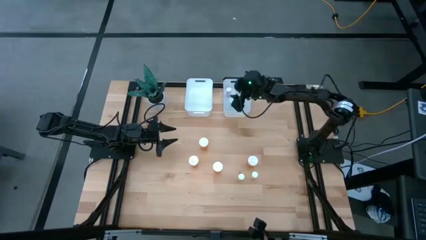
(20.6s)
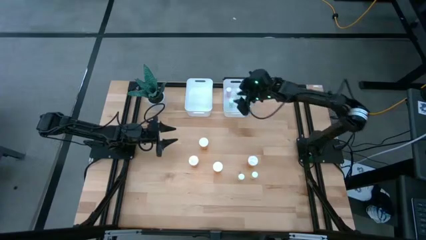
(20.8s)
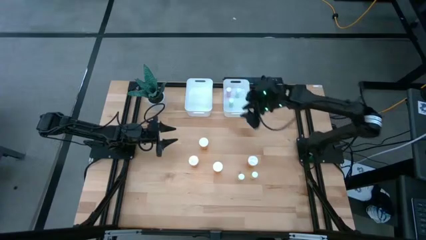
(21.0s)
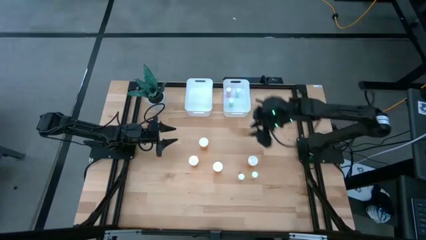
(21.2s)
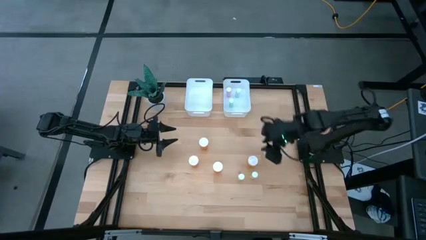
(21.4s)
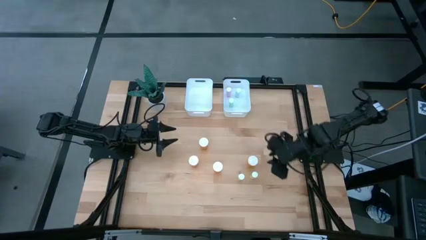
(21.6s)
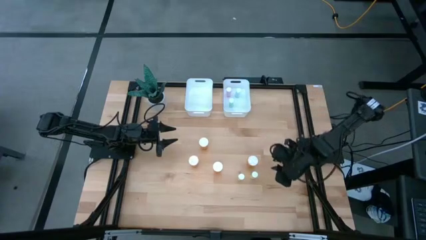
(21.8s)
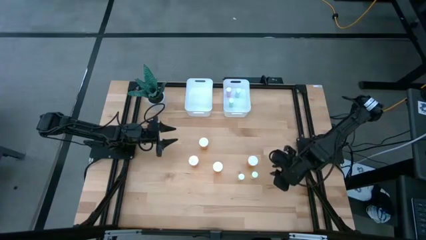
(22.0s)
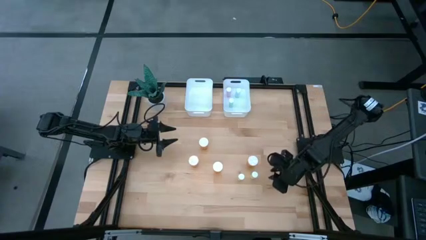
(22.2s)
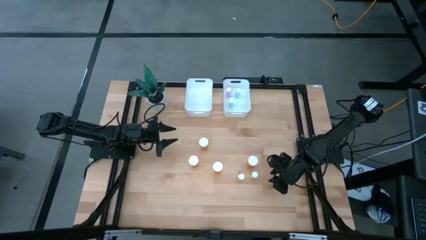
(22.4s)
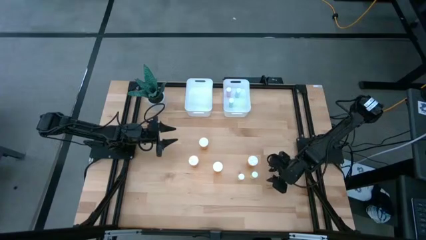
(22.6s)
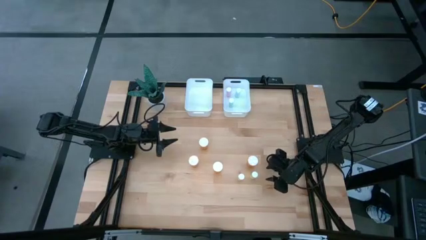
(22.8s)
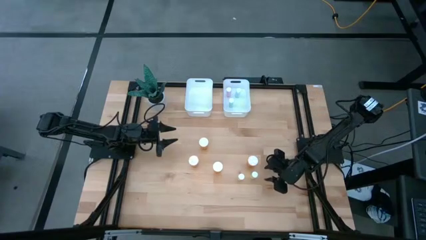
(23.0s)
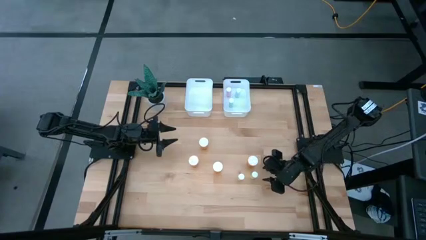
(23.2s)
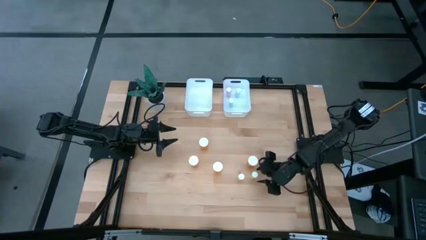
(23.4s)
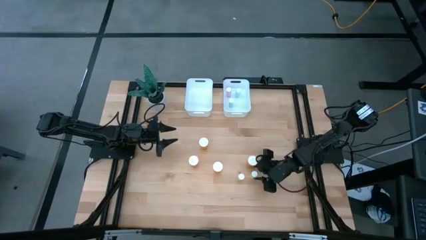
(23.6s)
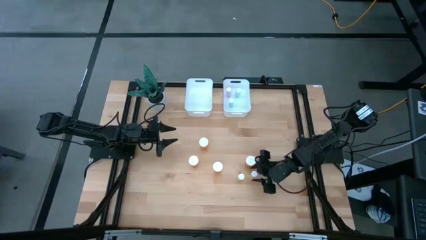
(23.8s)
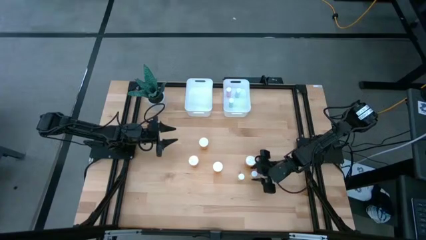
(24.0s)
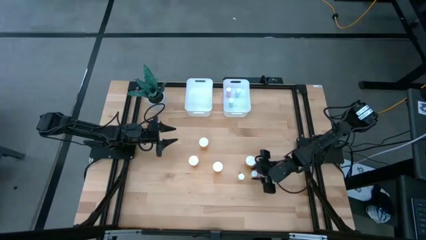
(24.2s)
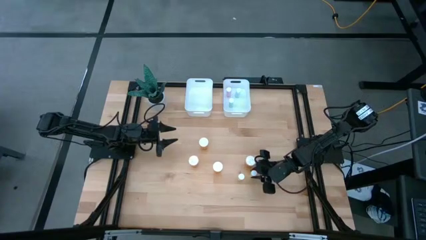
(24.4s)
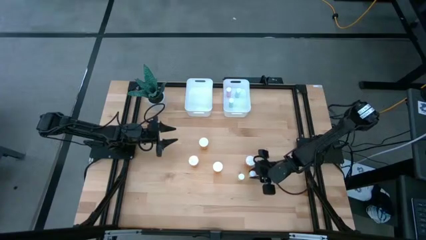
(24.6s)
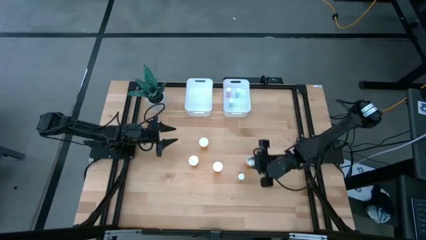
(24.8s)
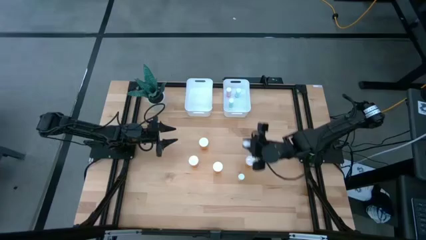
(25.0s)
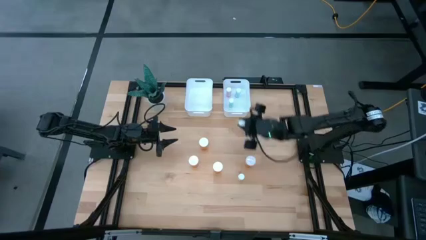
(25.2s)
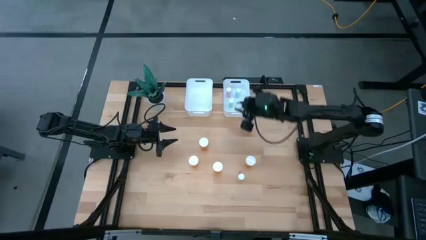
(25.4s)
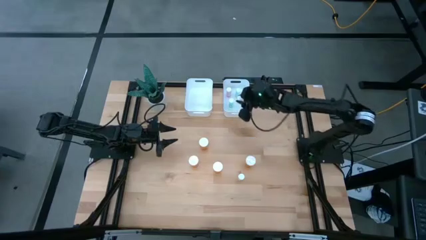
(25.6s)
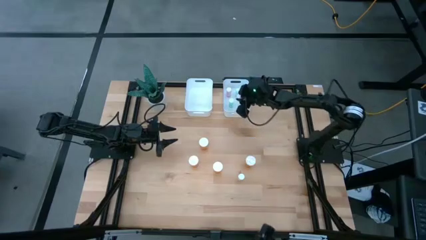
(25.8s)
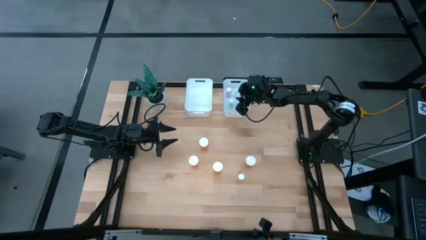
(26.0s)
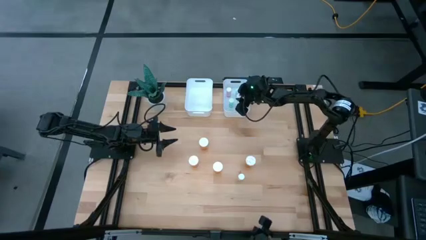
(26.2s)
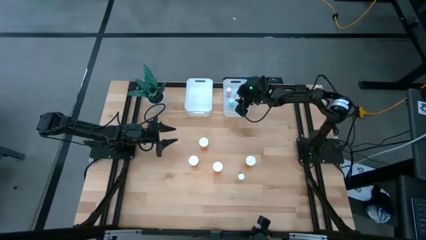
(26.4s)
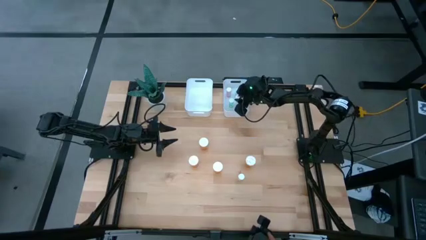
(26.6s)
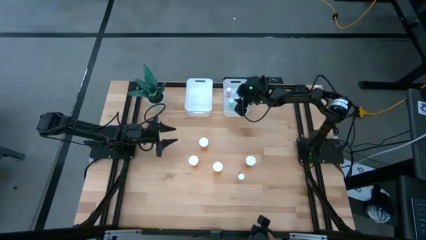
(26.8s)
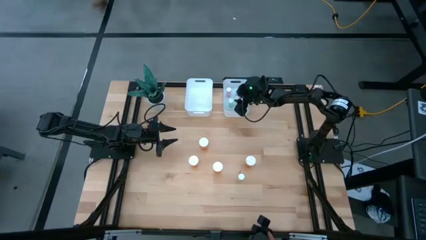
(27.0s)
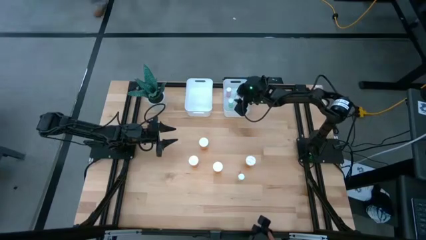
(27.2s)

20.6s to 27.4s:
Task: Pick and place medicine bottles into bin by pill shape (circle, oval)
Put the small yellow pill bottle into the right white bin

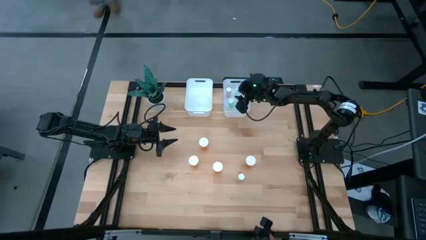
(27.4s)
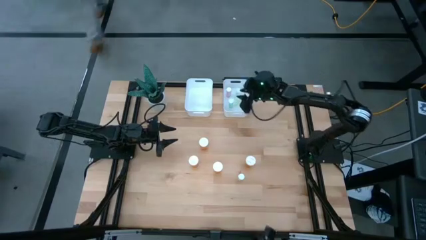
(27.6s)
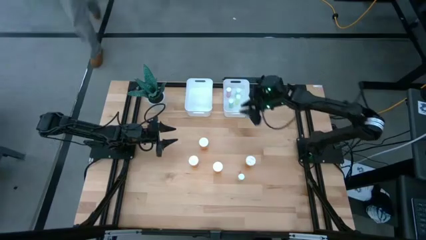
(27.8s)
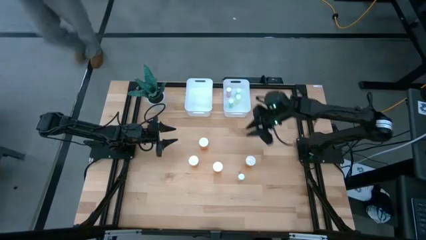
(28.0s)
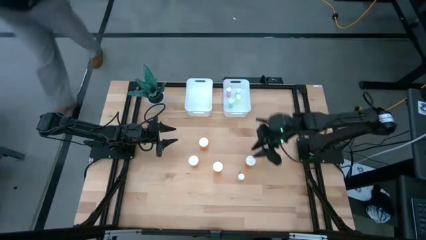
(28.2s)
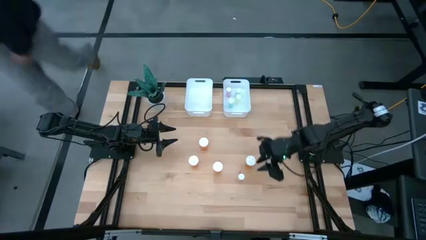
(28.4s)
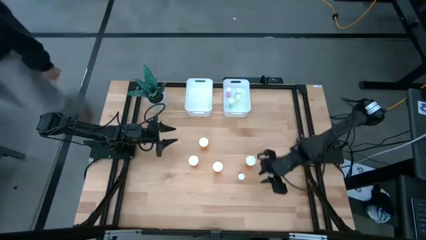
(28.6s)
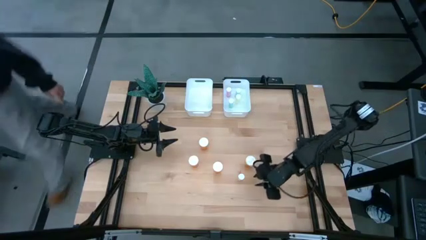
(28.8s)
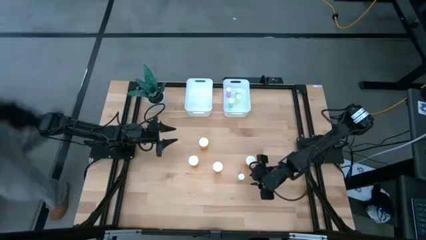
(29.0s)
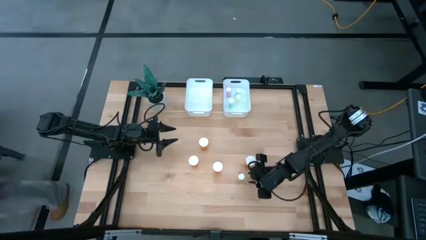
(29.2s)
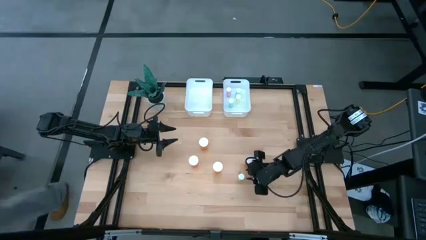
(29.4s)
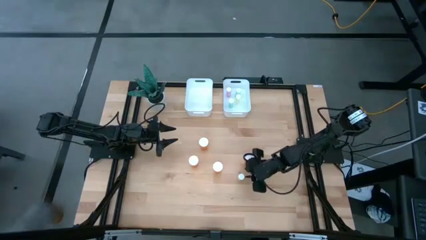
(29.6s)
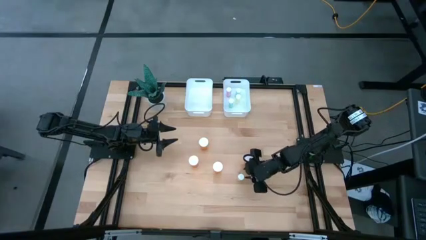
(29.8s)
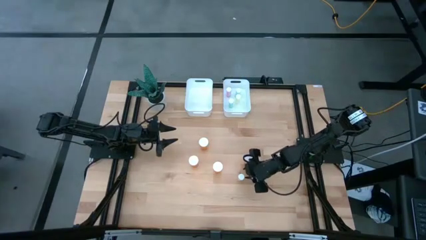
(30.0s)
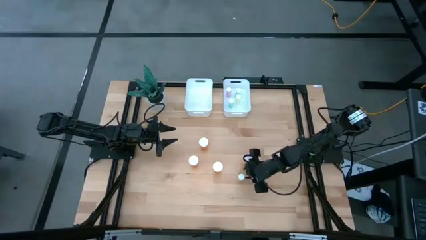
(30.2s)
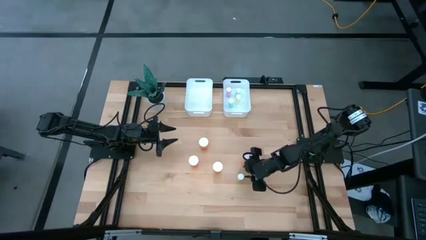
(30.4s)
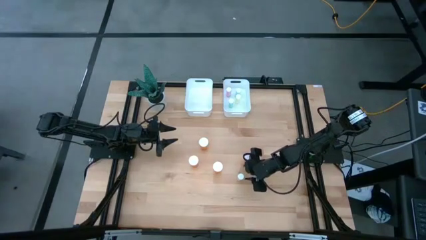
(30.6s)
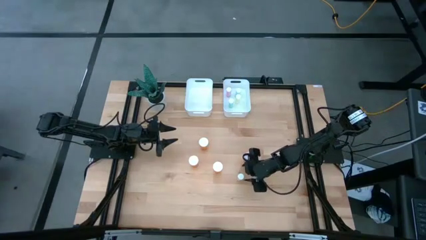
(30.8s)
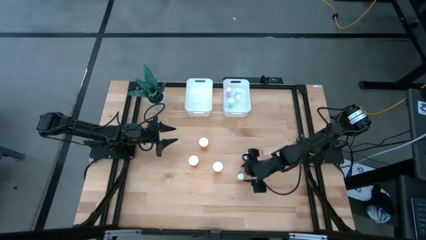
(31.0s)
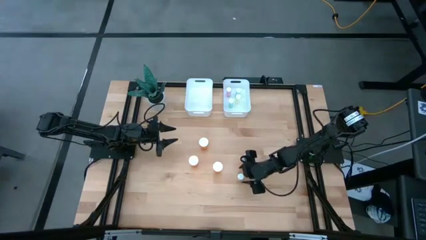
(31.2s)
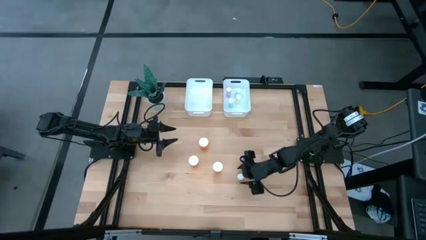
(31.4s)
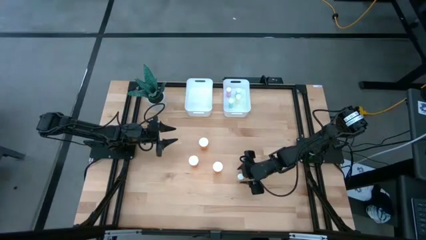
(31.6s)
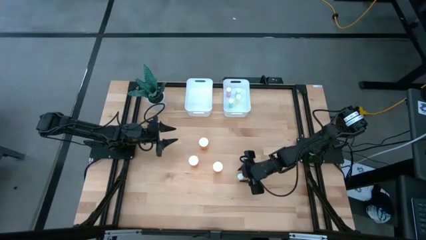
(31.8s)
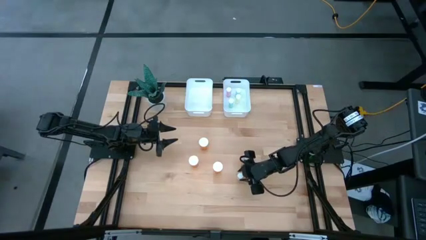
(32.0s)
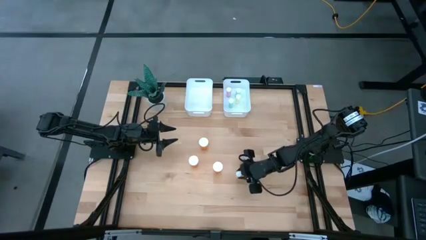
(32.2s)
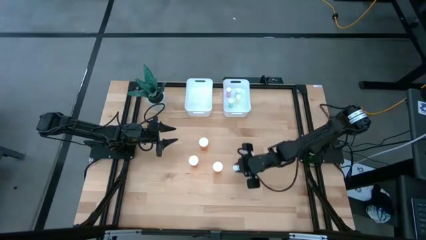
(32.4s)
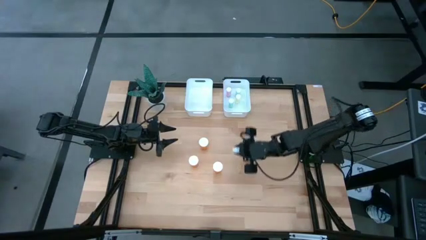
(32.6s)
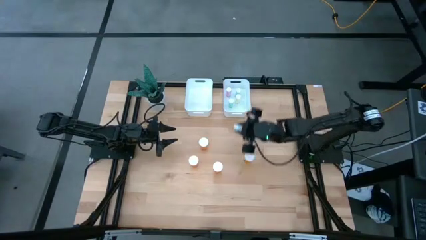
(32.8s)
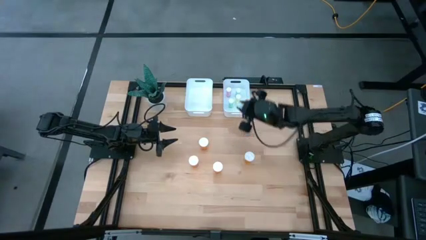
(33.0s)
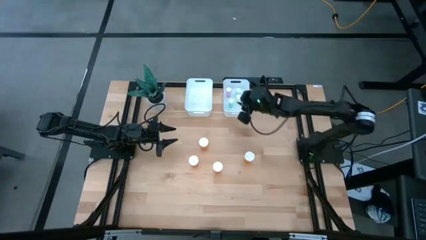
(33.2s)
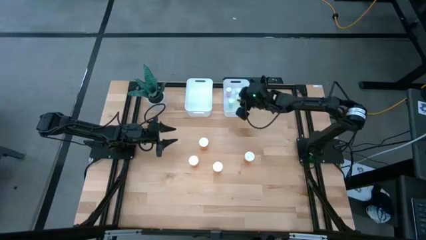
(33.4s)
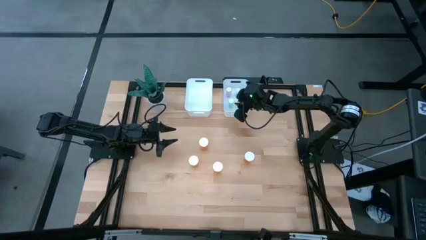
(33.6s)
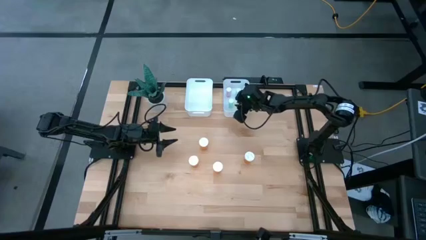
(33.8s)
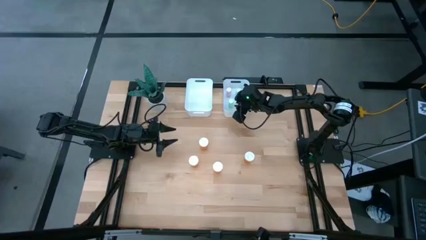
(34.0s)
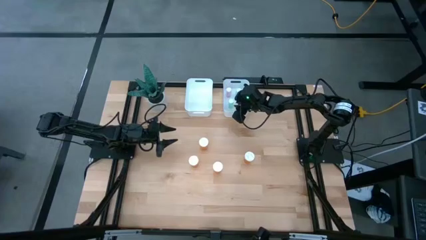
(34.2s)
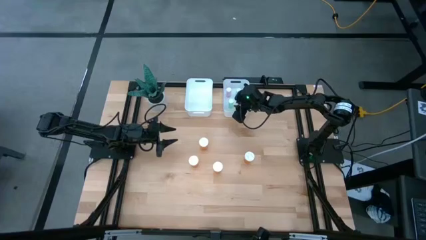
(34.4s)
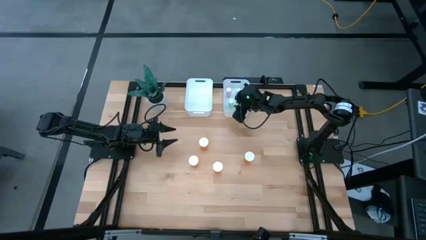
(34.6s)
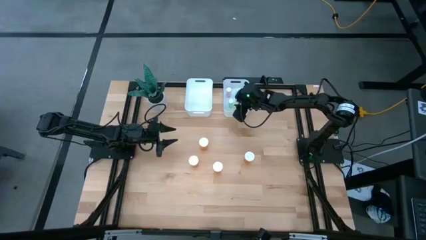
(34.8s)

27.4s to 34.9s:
Put the small yellow pill bottle into the right white bin

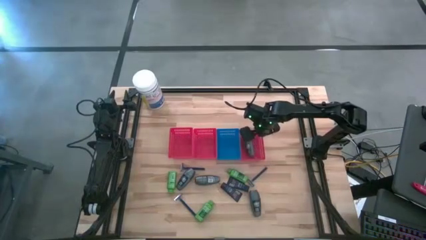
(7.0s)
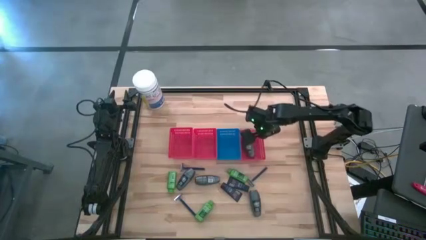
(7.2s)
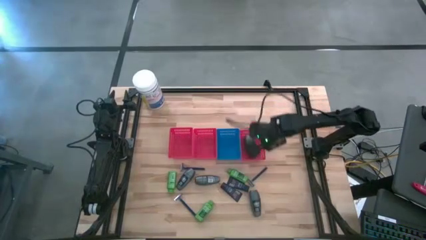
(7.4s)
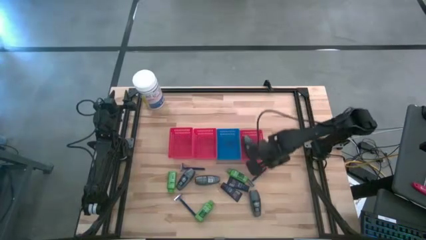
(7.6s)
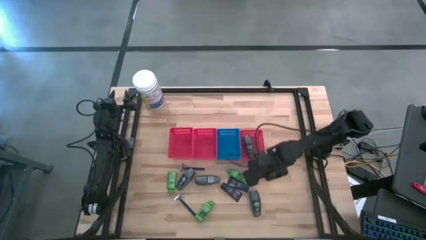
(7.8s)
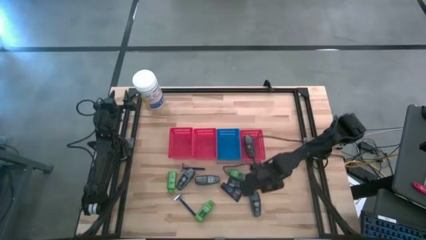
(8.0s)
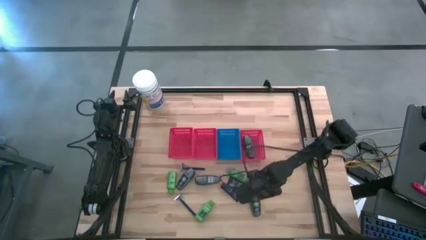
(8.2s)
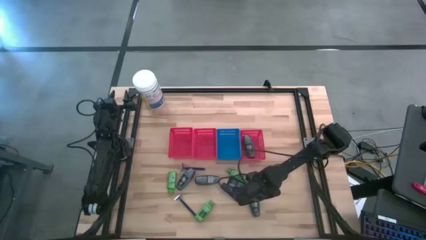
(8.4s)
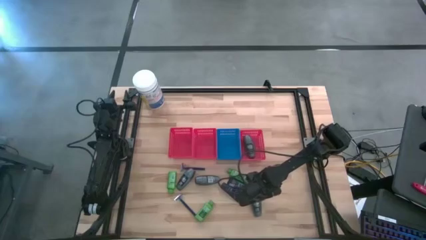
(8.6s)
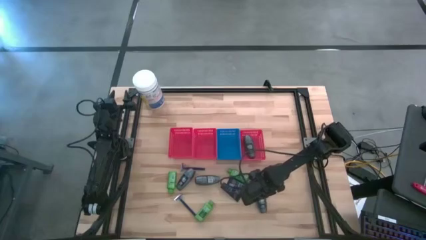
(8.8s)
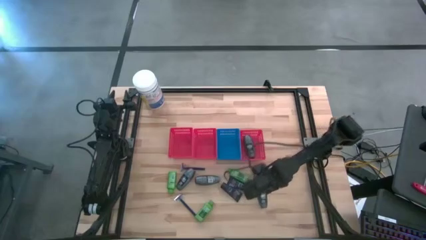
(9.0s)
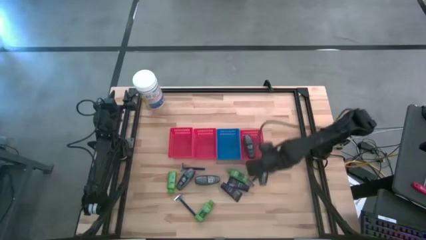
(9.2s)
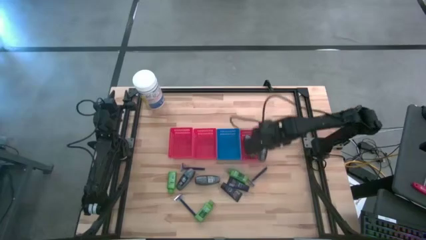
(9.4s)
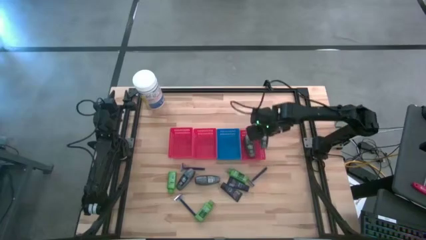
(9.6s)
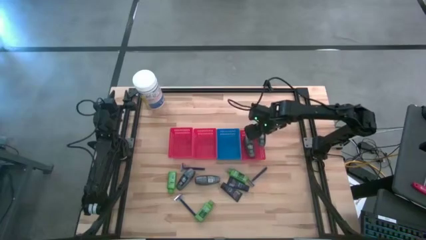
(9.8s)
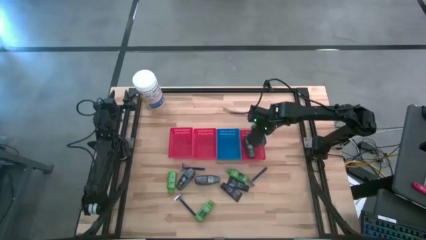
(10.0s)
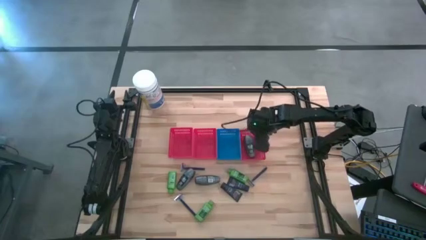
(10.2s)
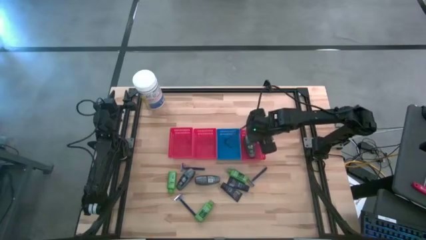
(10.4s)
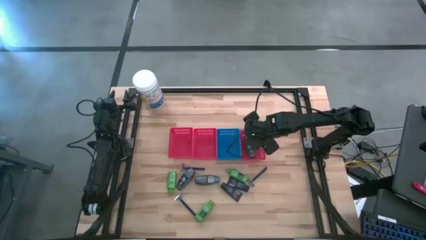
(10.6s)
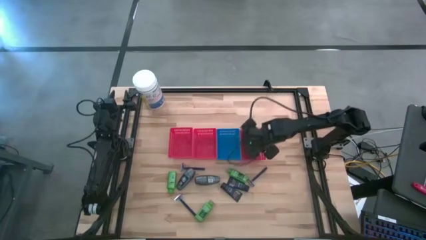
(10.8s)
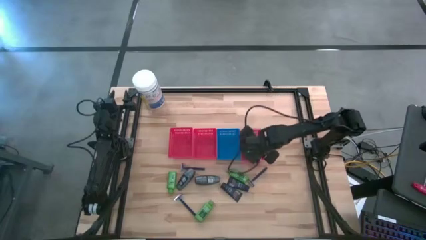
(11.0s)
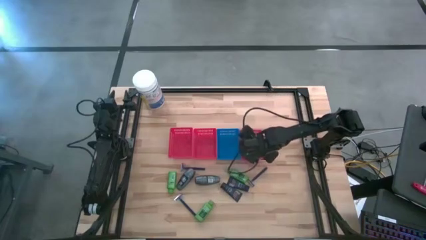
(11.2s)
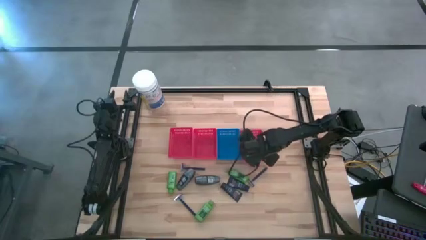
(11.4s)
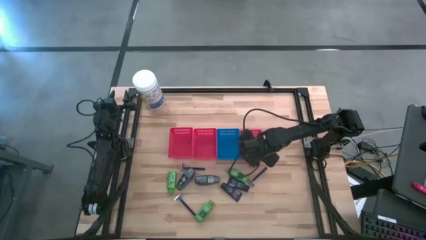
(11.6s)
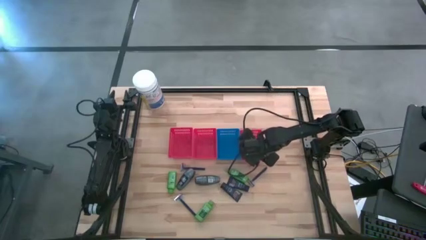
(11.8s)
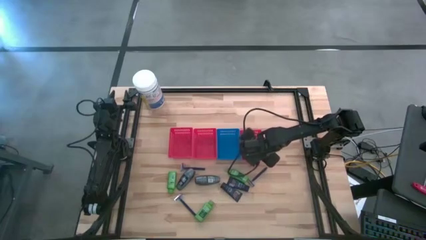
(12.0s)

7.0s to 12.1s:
Task: Pick & Place Travel size toiletries
Put the black deodorant into the right red bin
